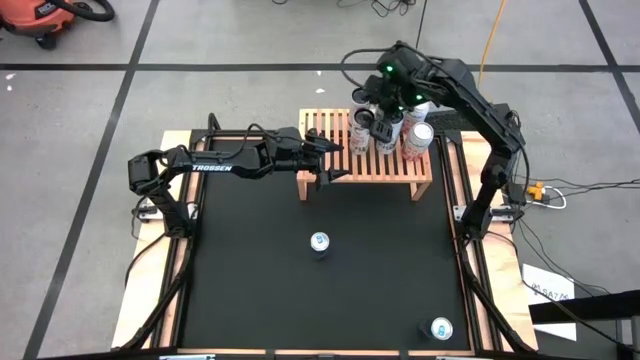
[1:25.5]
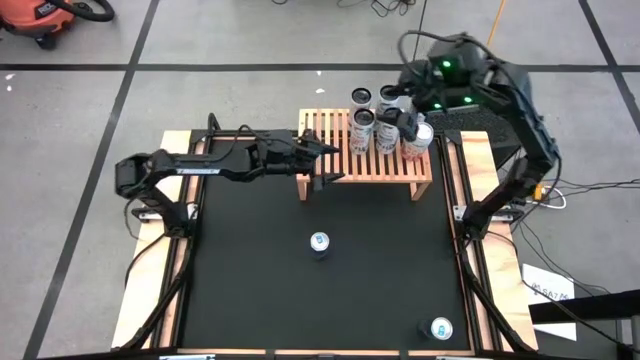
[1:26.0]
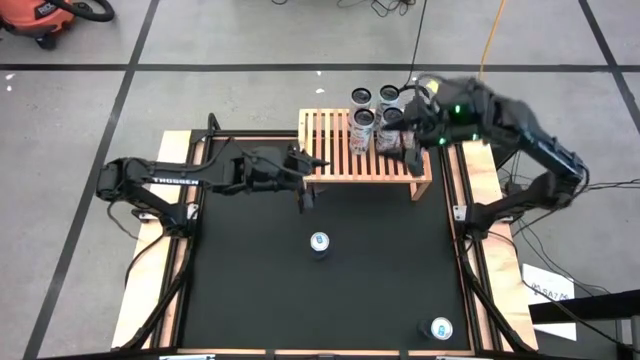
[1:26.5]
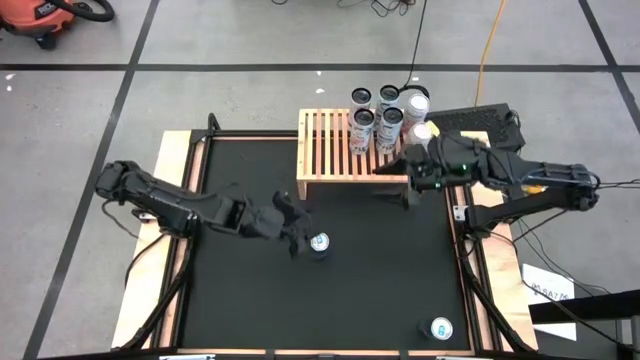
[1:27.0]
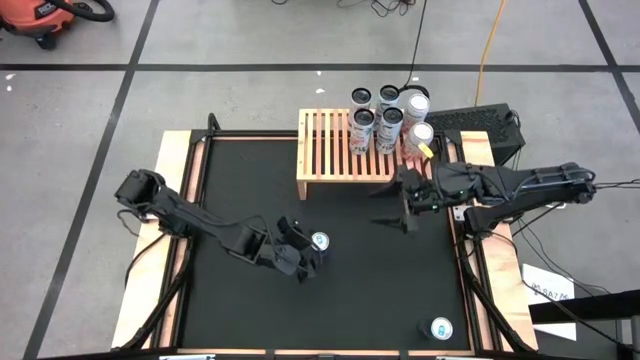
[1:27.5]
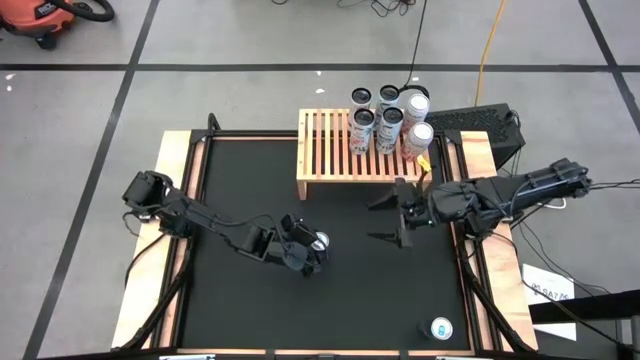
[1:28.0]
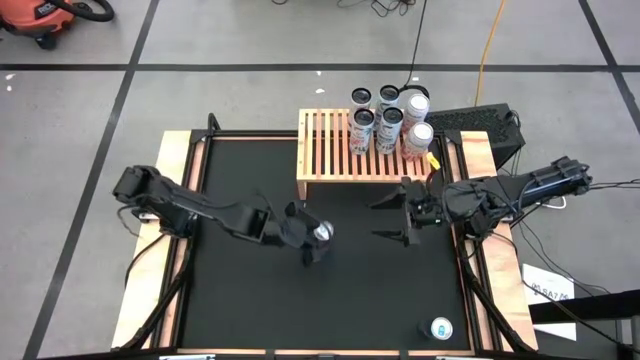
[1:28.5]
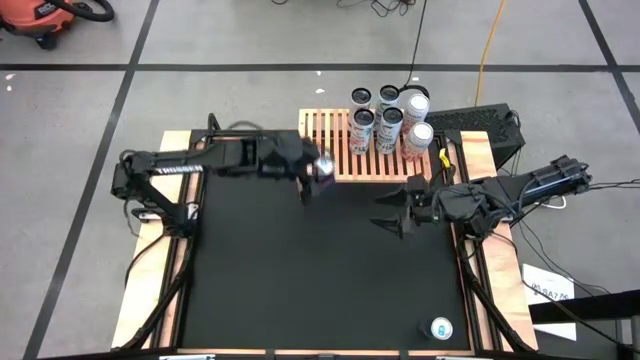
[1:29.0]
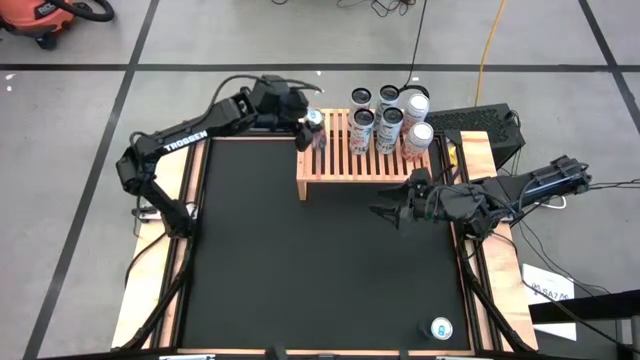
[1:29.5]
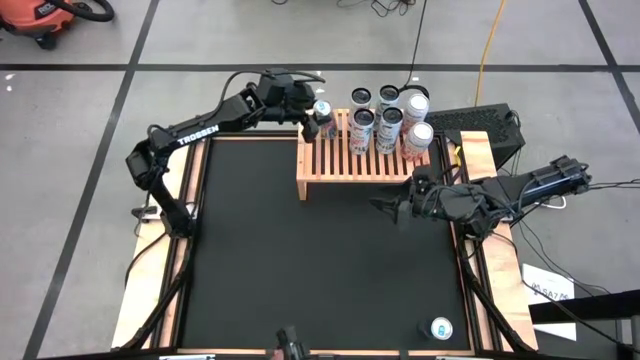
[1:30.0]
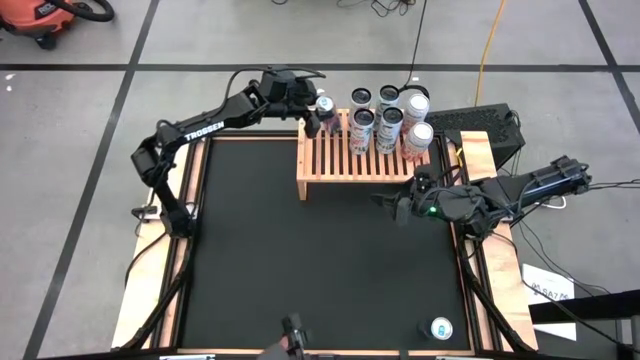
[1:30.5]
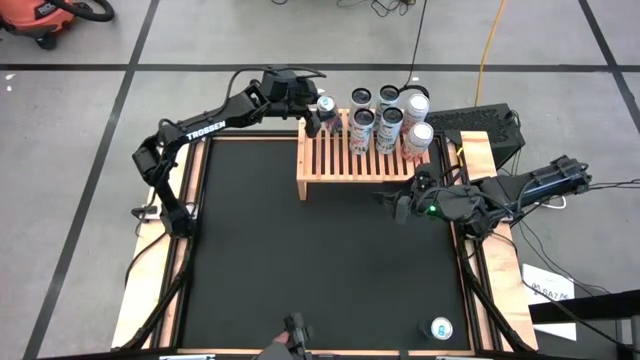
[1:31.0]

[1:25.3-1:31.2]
Task: Place canned beverage on shelf
Put the top blue soda can on the shelf

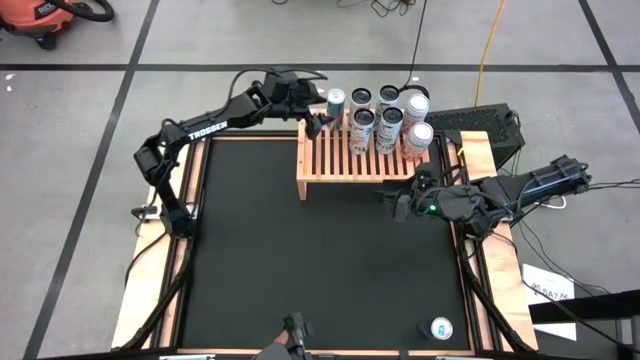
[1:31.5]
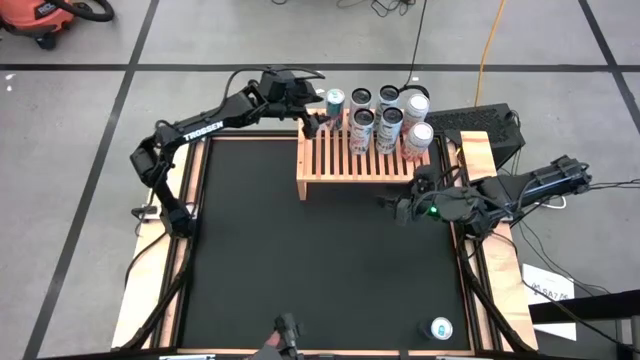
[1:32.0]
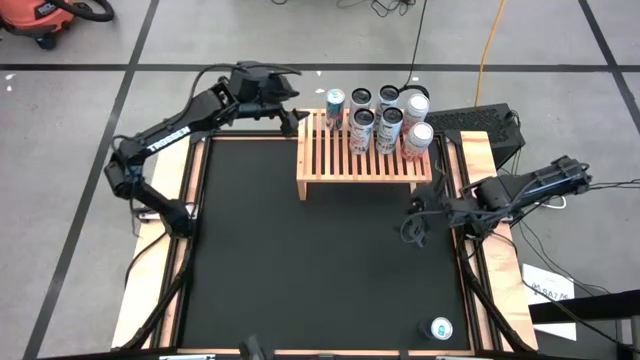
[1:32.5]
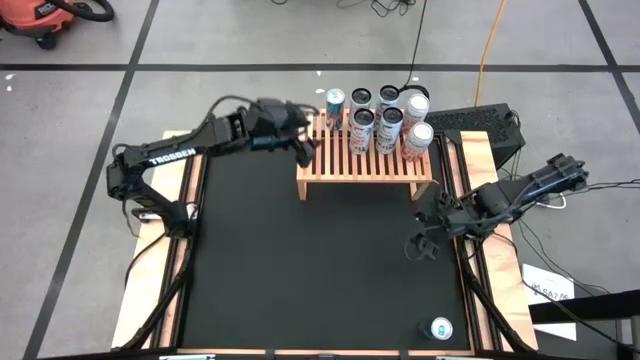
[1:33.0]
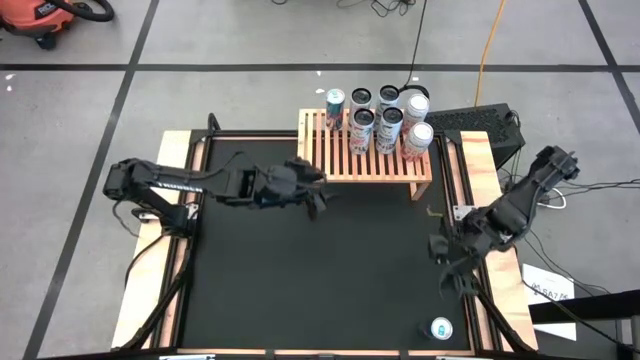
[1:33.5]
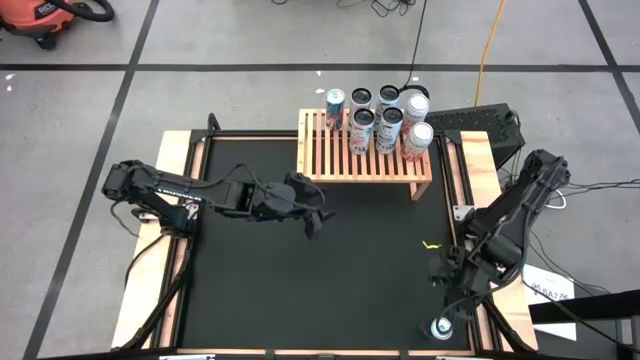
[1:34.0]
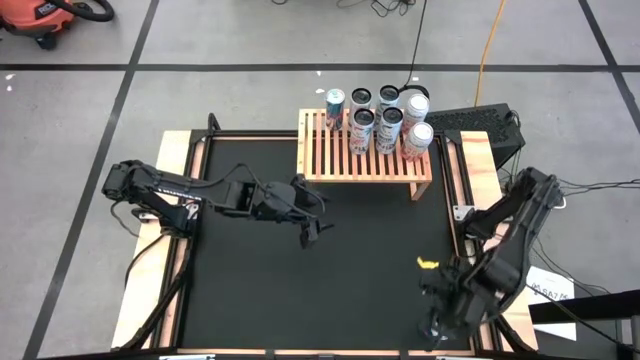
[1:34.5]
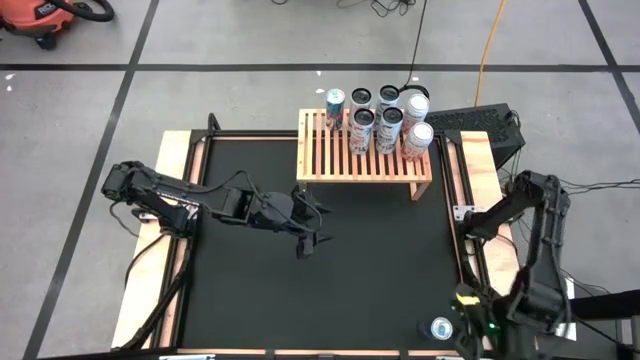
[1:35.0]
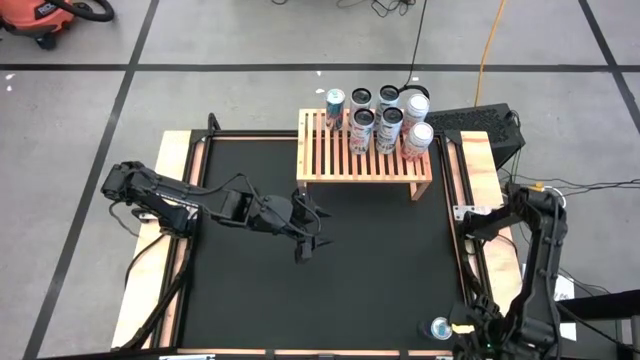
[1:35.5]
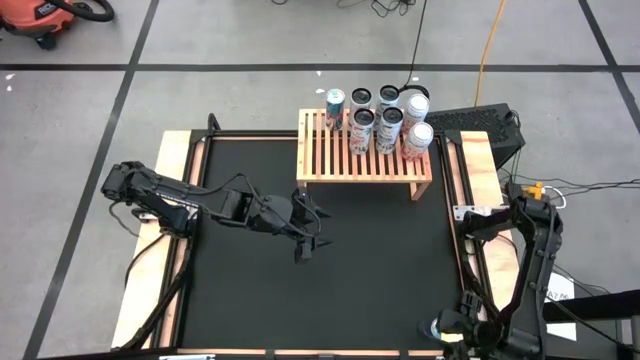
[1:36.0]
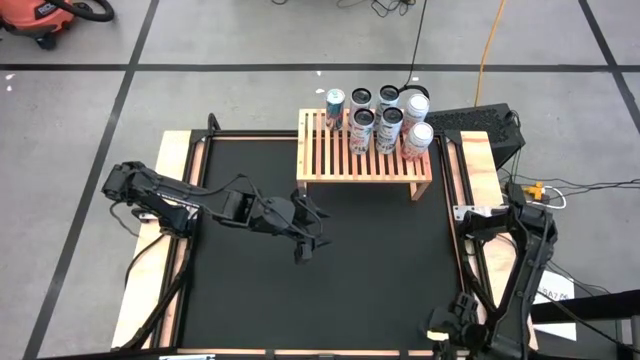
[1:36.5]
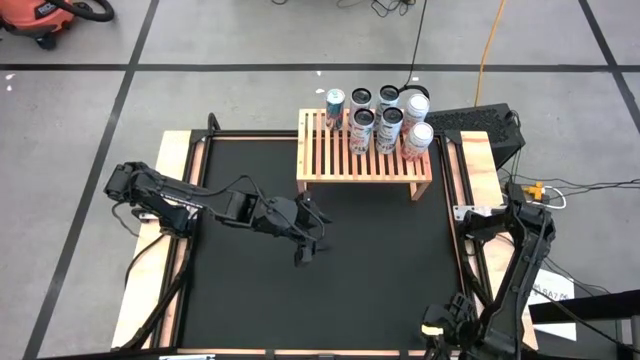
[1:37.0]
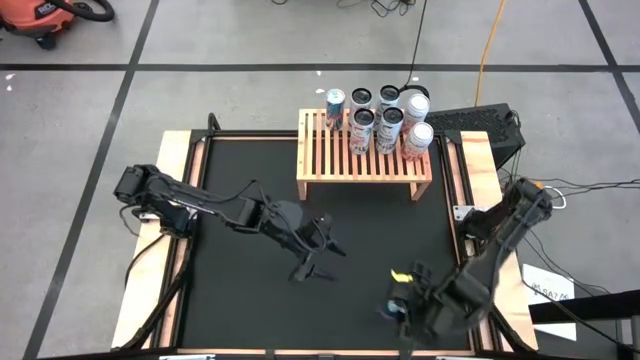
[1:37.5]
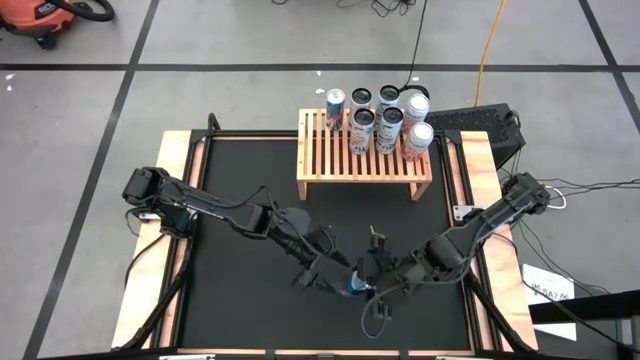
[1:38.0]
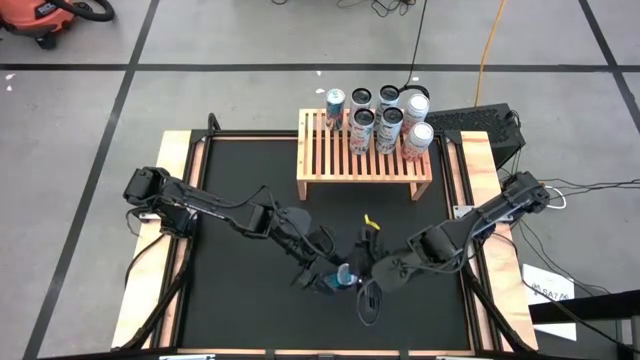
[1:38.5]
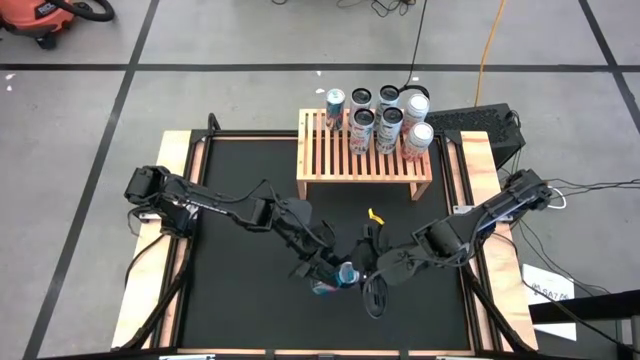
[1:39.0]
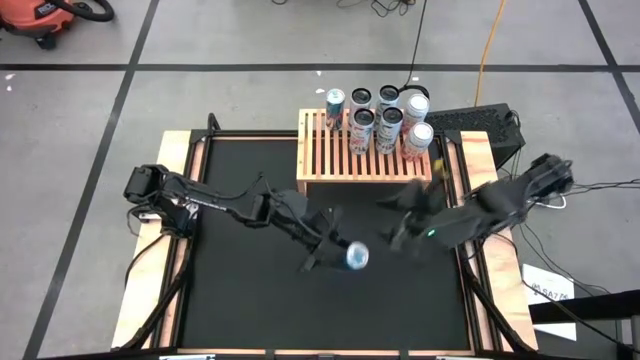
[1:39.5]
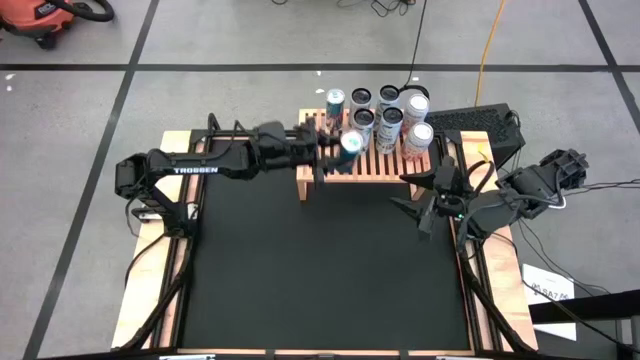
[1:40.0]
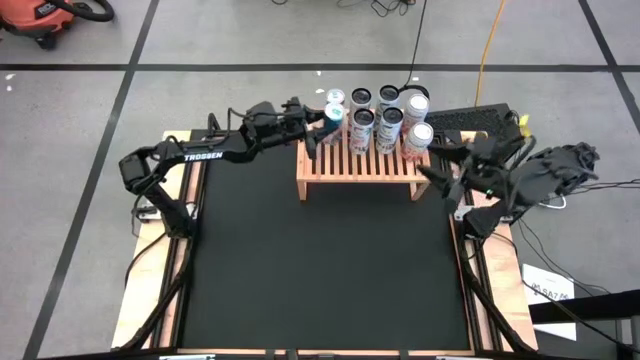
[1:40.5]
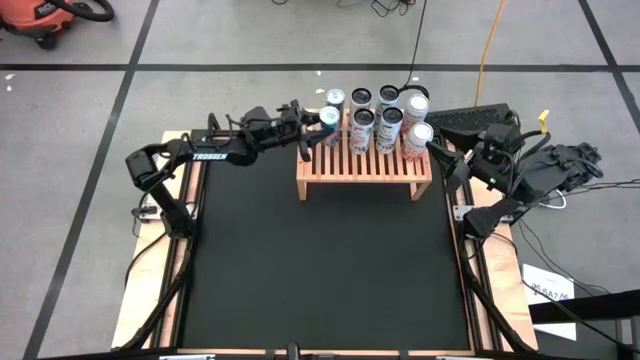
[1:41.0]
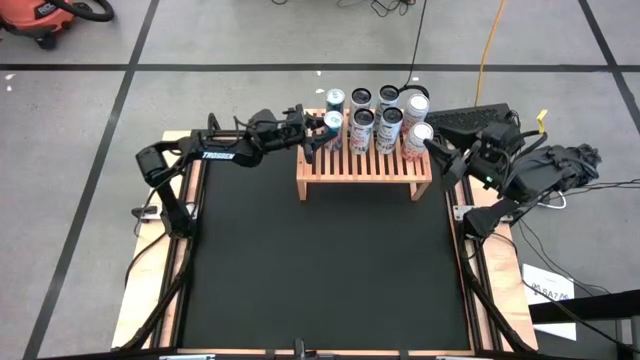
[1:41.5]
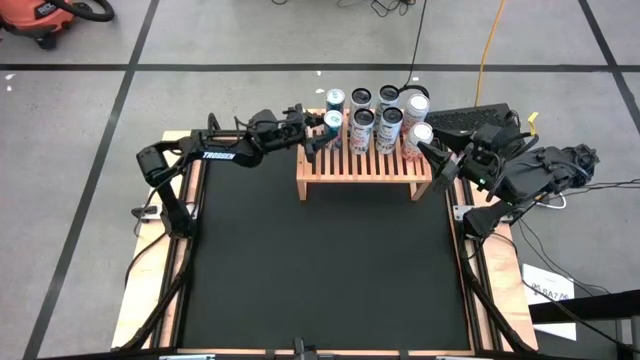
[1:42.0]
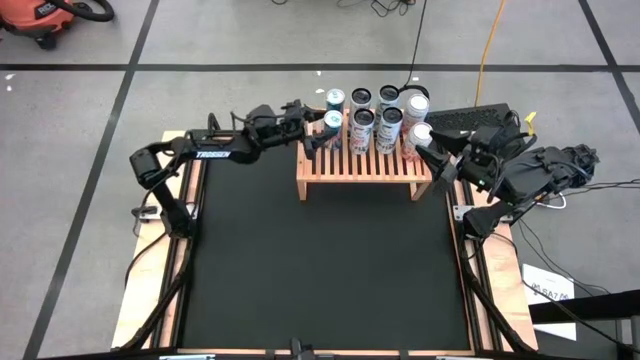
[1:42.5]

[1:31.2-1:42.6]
Put the blue soda can on the shelf

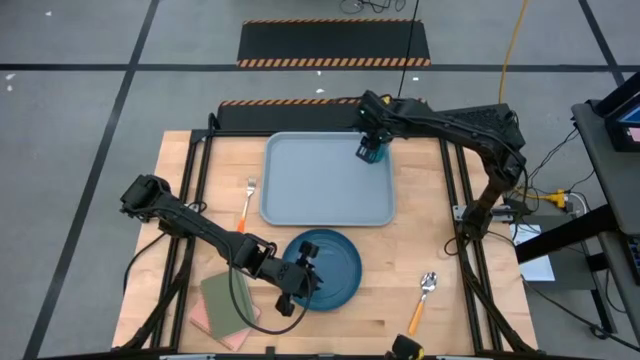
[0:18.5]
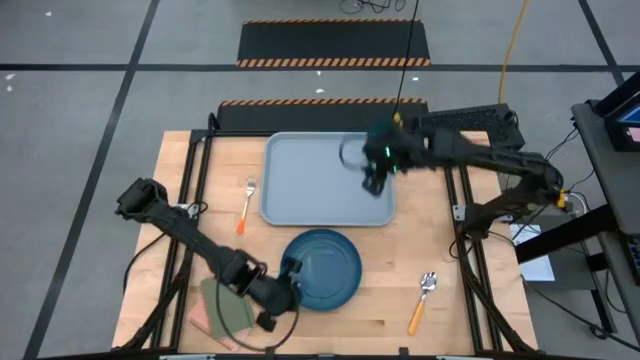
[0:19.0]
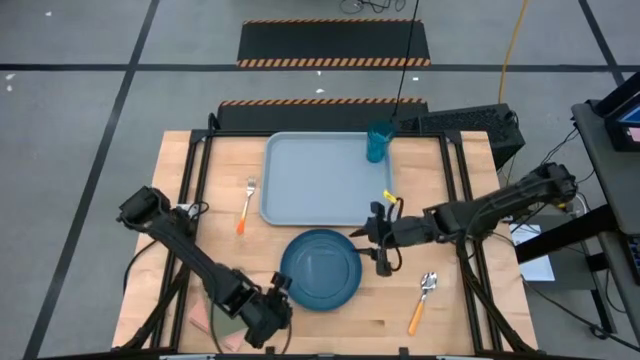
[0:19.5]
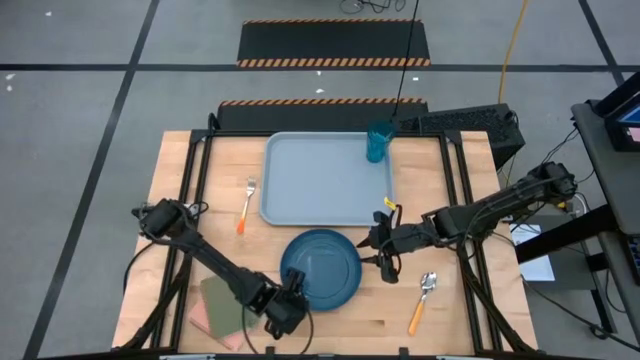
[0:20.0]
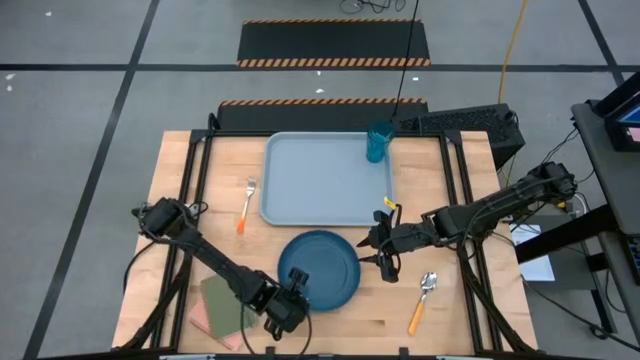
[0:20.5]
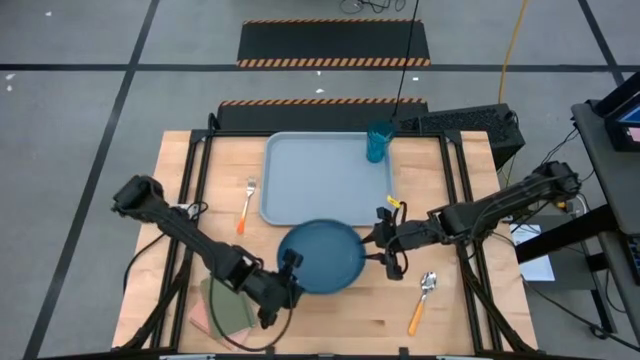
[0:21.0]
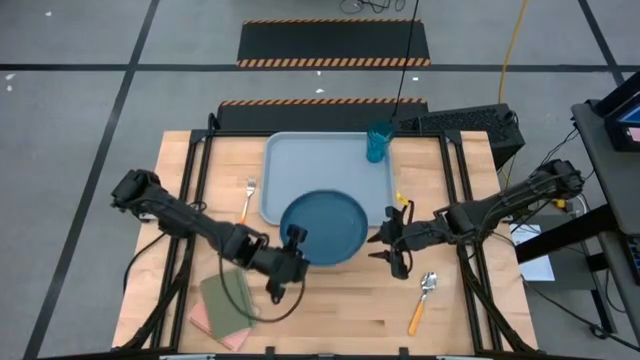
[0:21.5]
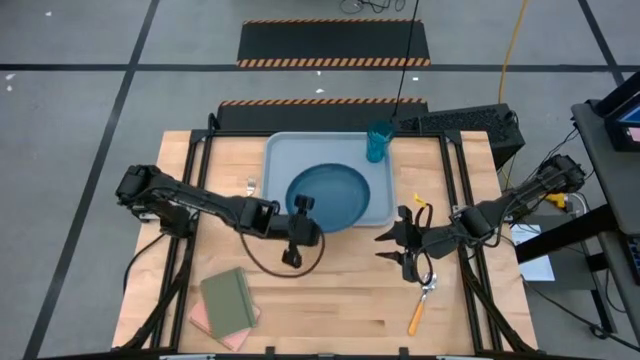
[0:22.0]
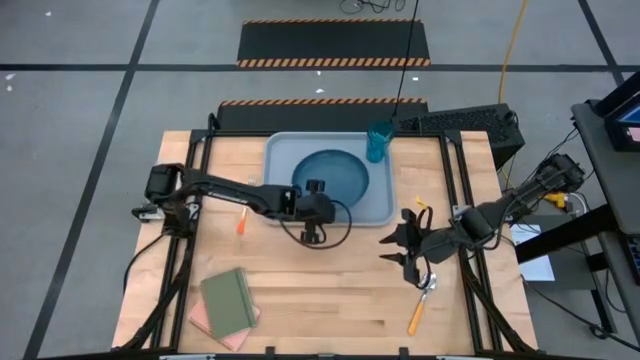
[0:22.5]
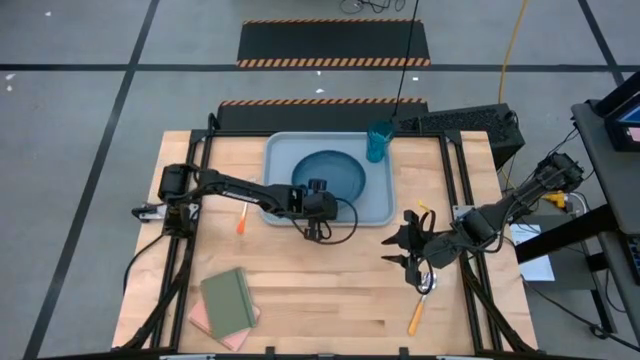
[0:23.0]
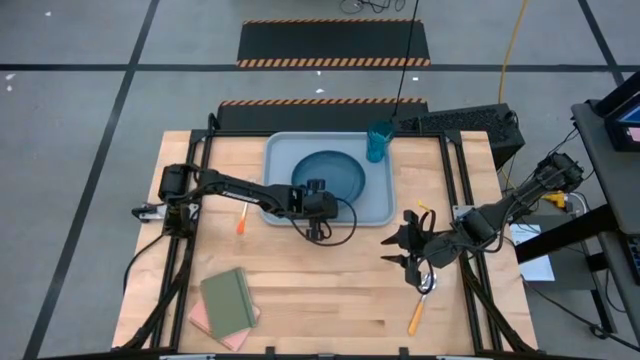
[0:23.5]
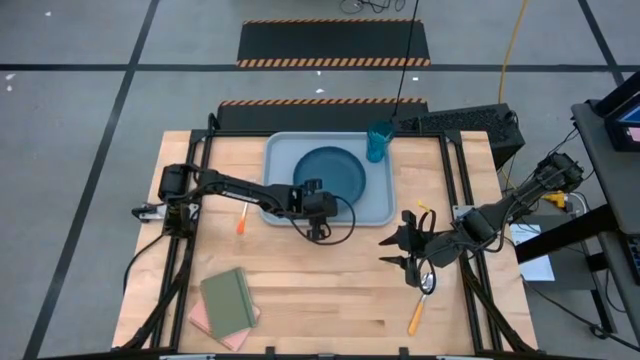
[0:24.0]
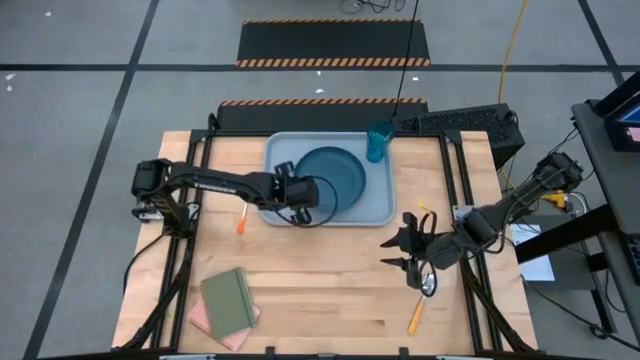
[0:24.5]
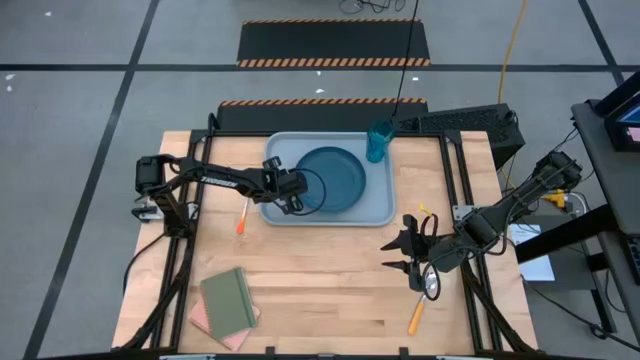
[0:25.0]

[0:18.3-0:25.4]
Task: Pick and place plate/cup/fork/spoon on tray
Put the blue plate to the center of the blue tray
